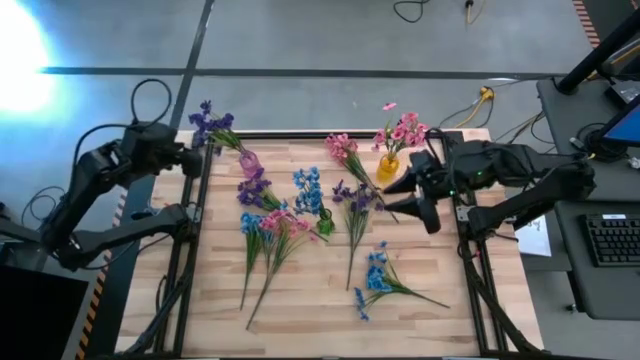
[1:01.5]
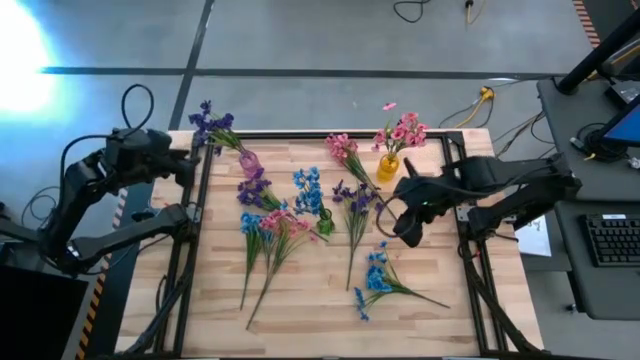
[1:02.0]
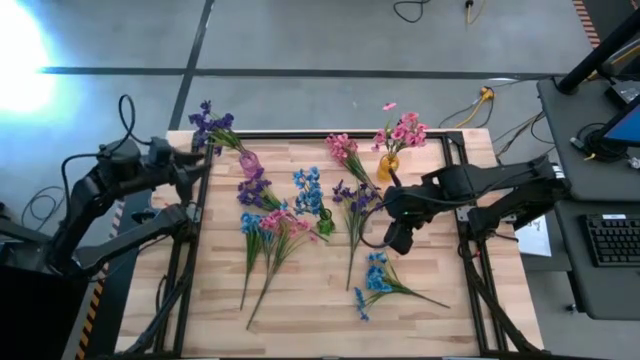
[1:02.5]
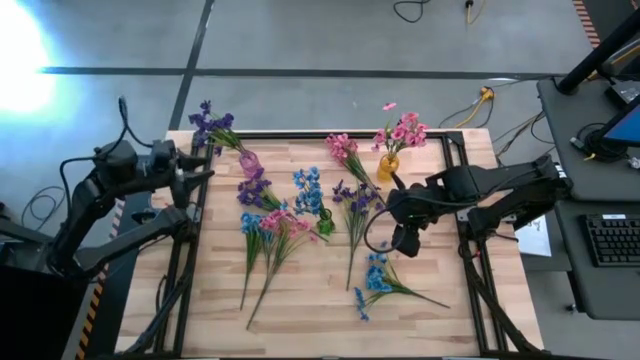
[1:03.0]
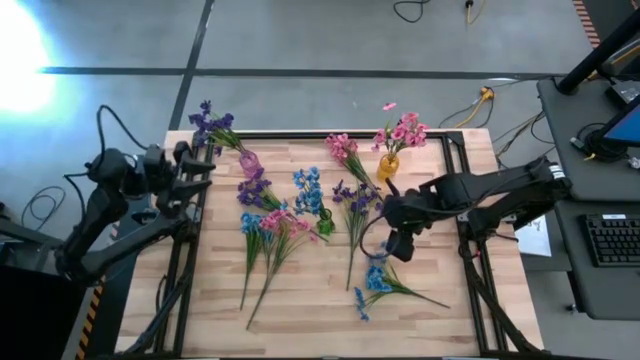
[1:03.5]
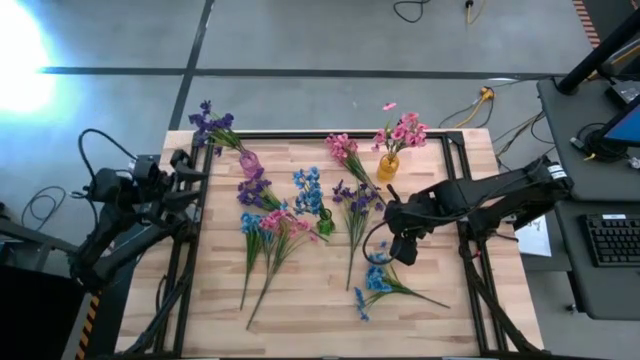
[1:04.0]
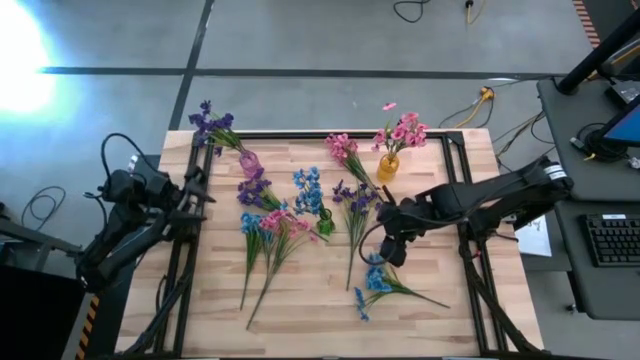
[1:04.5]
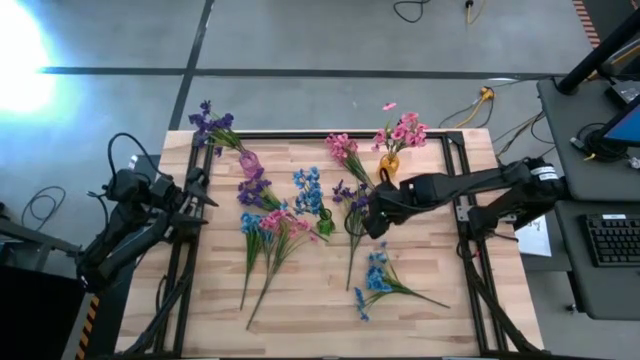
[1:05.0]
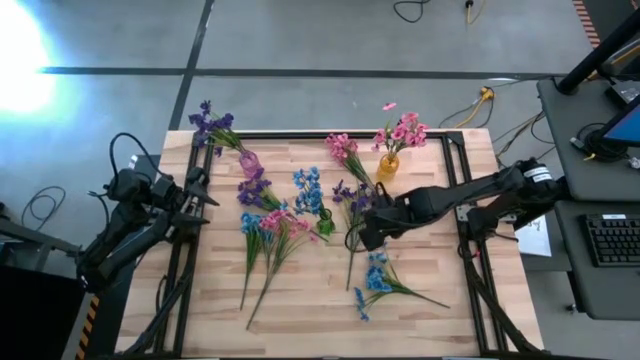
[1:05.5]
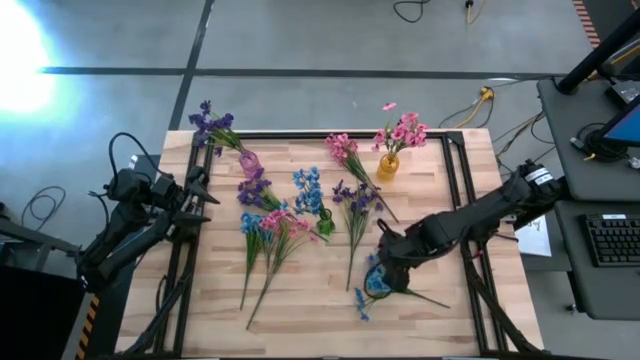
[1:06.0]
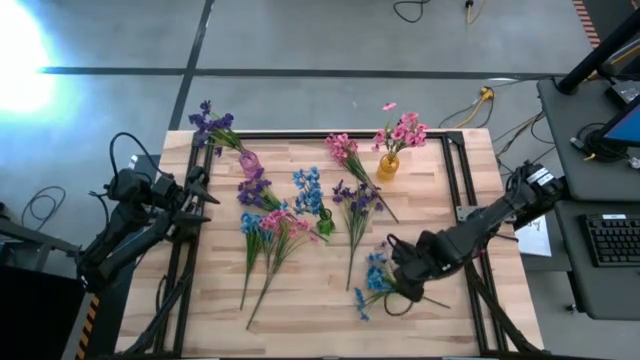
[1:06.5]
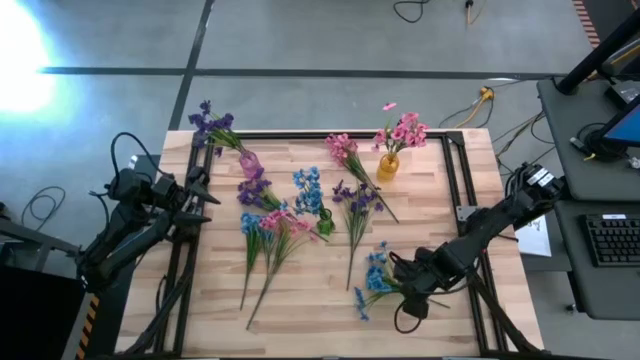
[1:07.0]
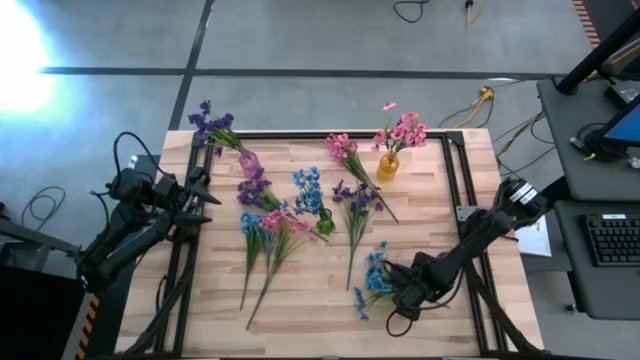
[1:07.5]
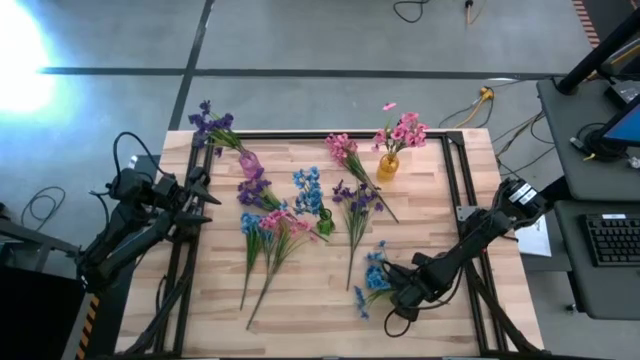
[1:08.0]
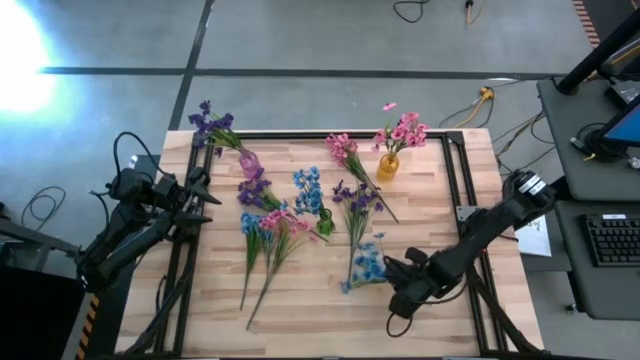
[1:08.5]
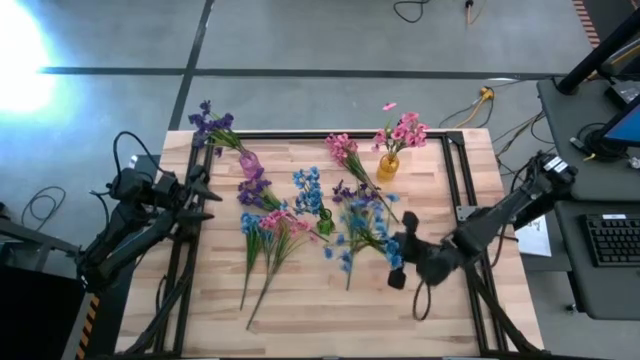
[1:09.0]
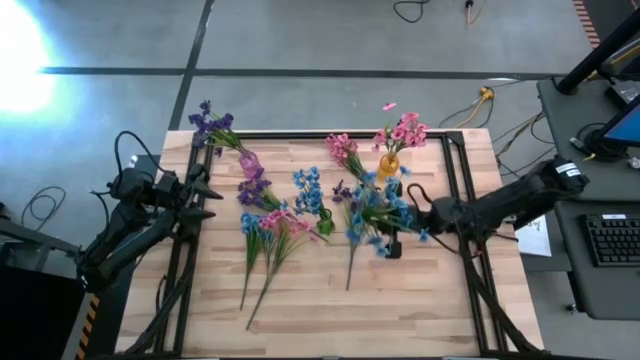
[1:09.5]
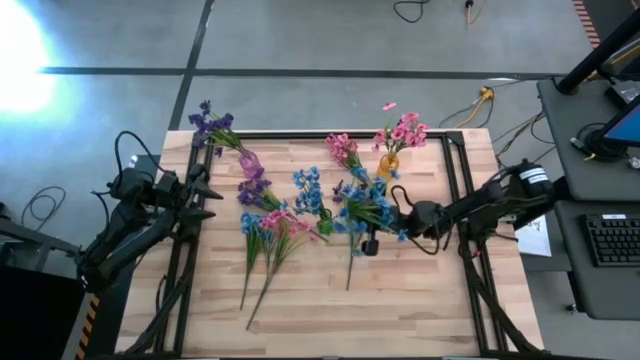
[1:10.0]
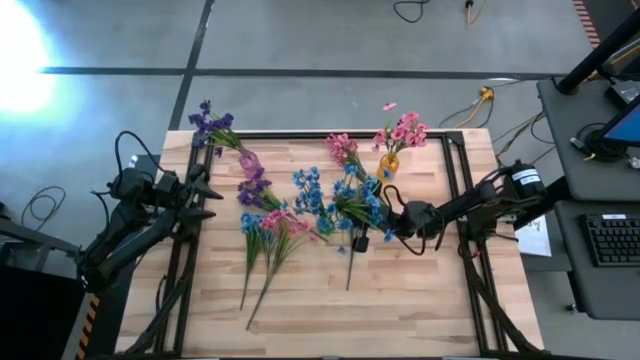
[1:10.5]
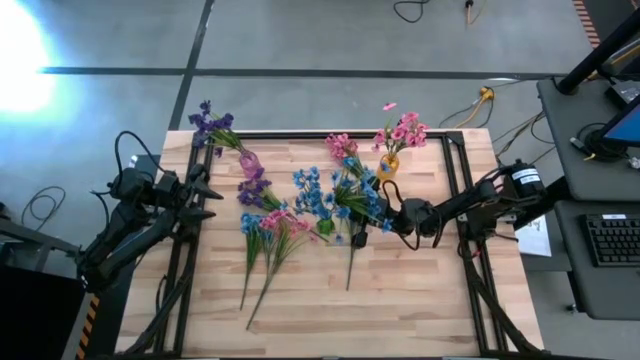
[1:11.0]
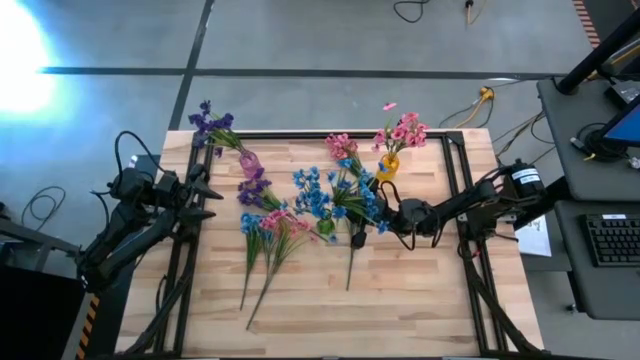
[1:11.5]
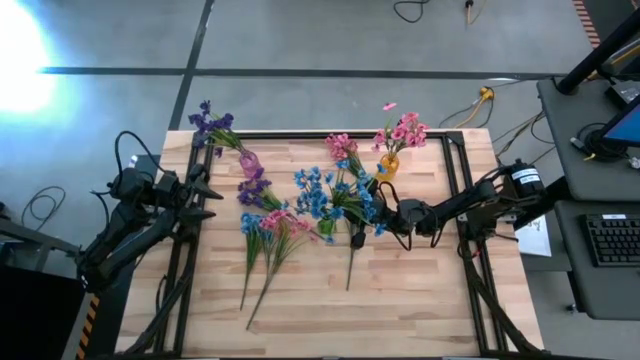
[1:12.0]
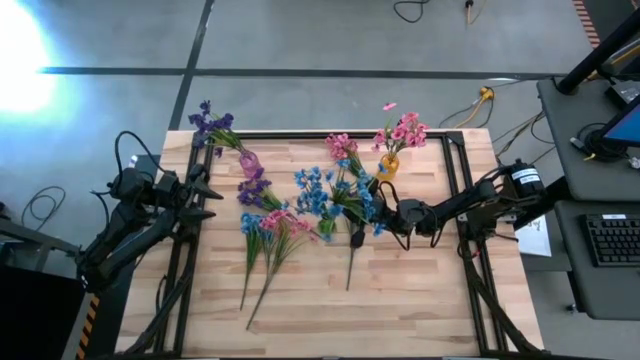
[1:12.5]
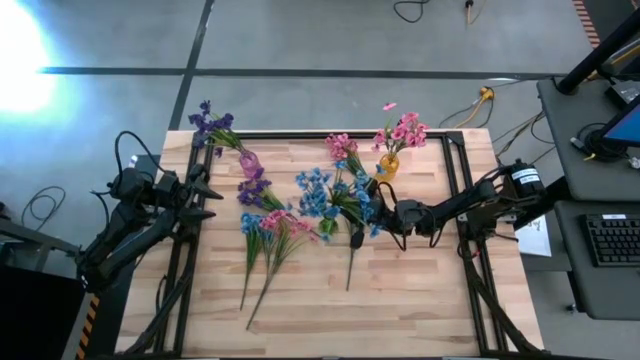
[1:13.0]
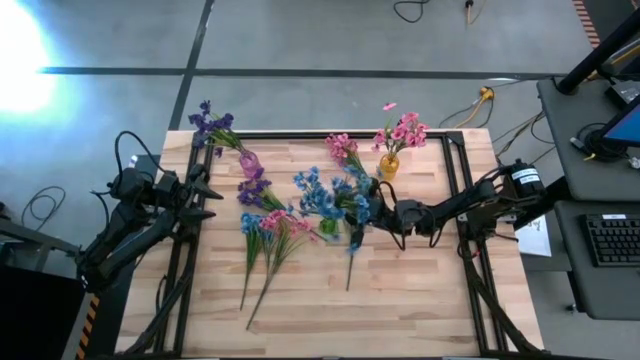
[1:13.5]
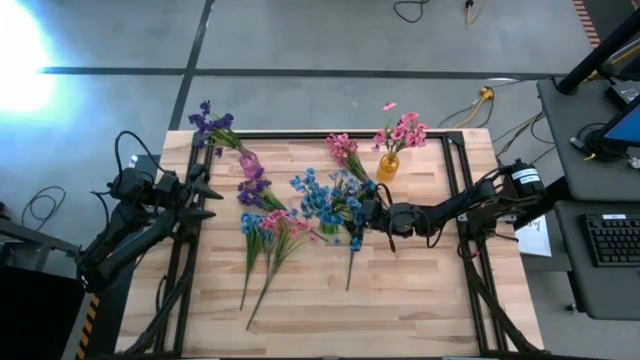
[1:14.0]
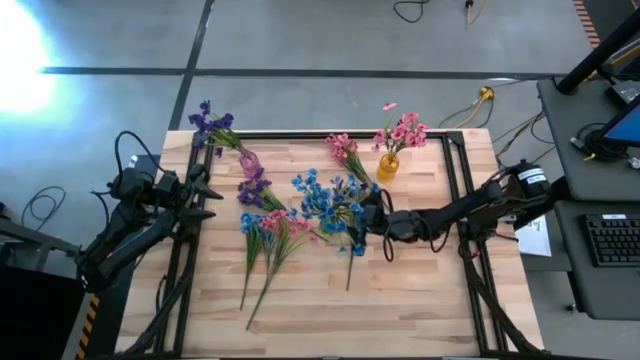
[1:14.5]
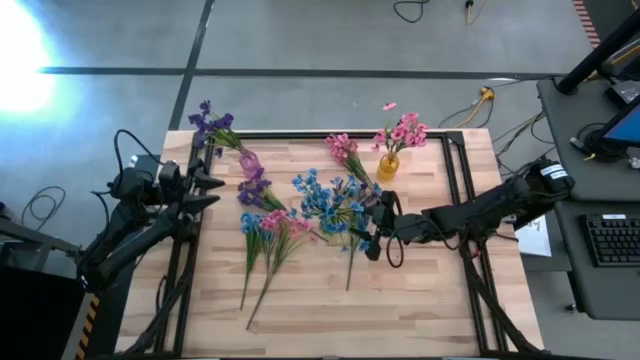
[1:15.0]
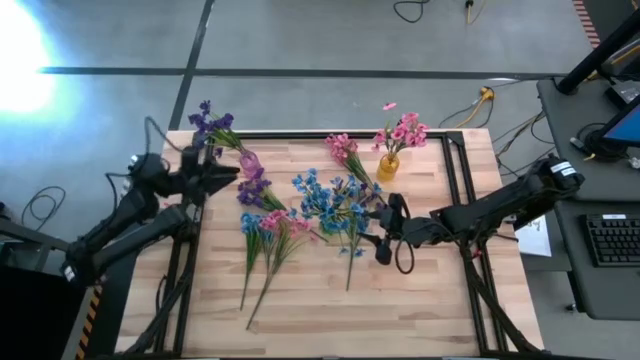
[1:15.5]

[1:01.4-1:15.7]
Task: Sort flowers into vase by color
Put the bottom blue flowers into the green vase

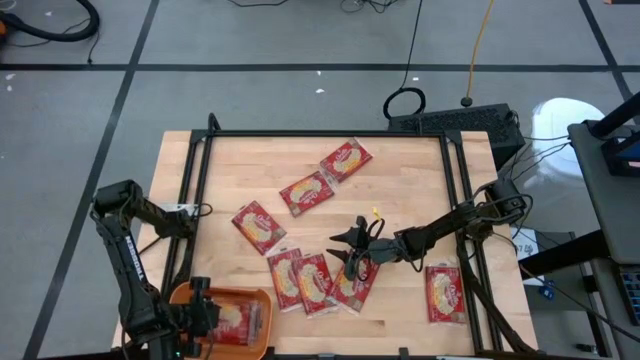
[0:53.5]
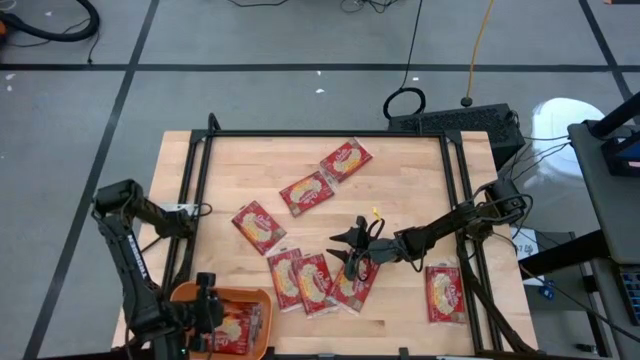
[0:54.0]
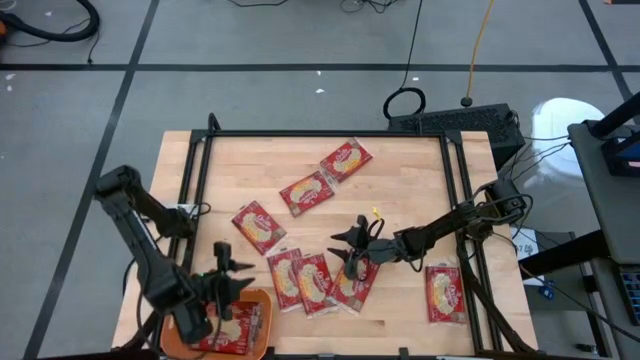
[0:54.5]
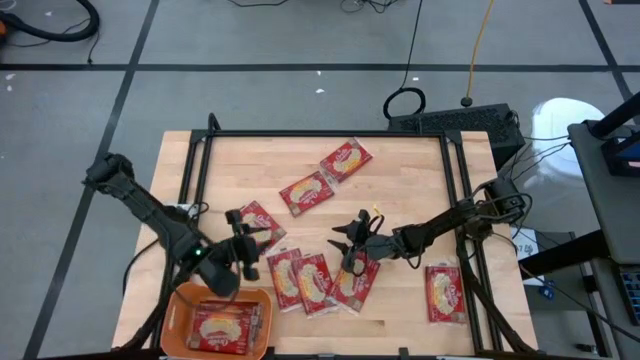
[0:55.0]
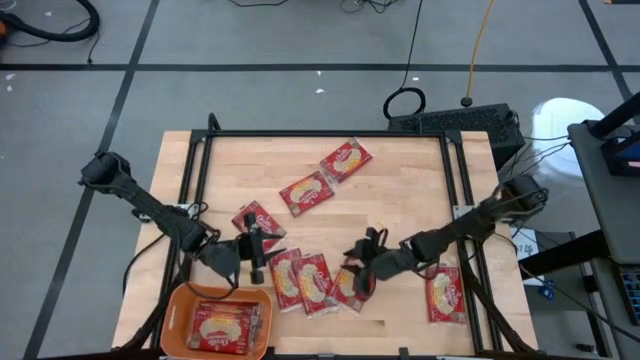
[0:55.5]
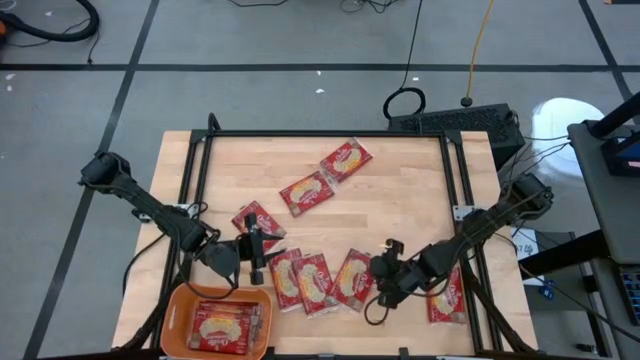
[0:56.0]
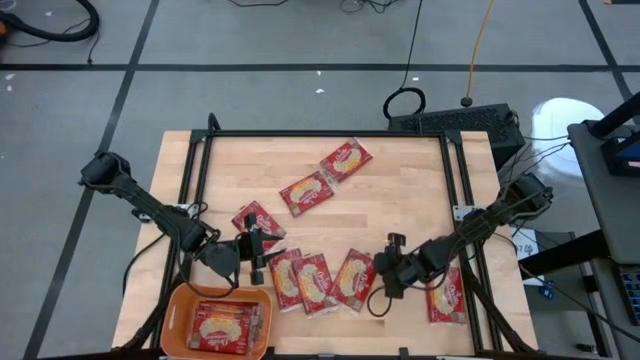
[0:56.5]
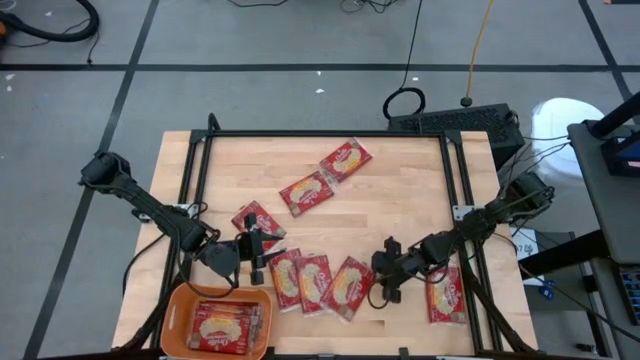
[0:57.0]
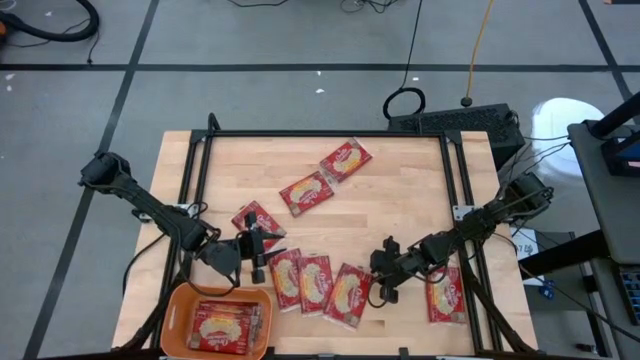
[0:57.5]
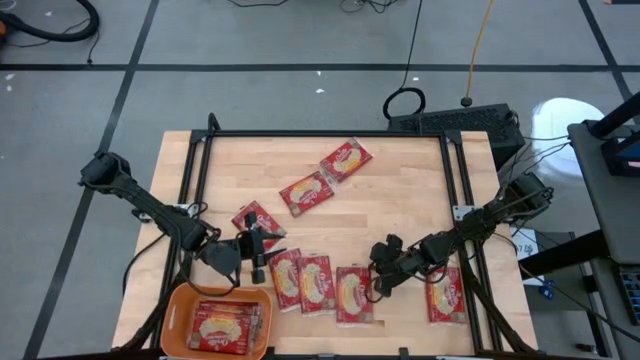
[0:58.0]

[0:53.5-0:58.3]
Task: Sort popcorn bags into baskets
Put the popcorn bag into the orange bin
